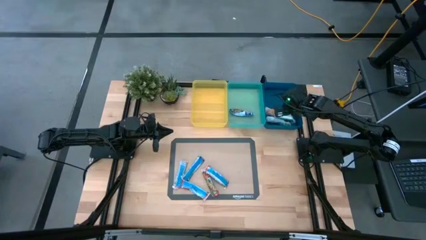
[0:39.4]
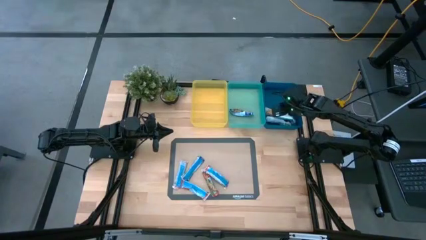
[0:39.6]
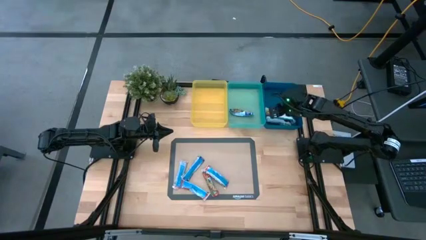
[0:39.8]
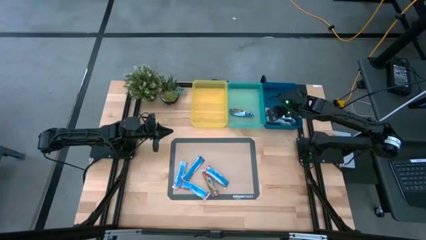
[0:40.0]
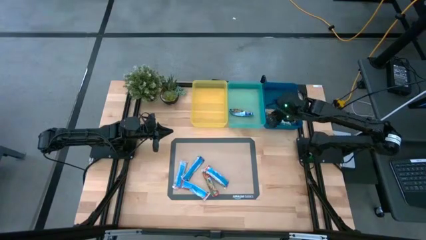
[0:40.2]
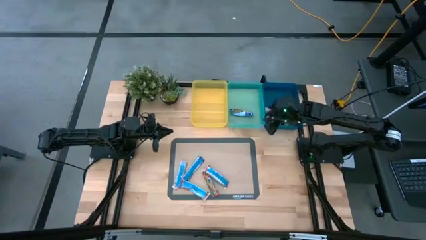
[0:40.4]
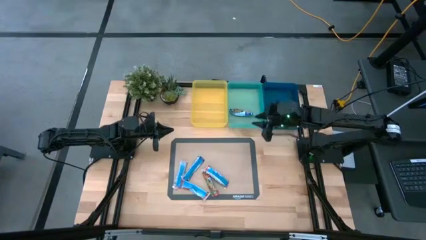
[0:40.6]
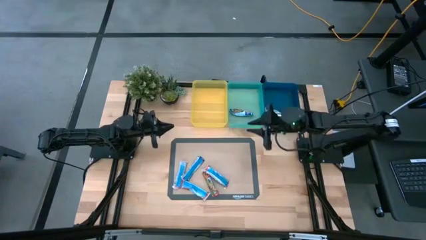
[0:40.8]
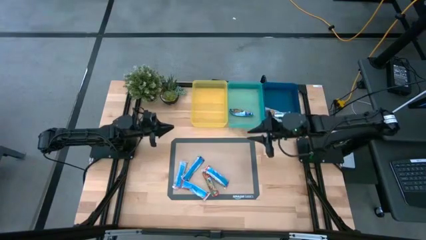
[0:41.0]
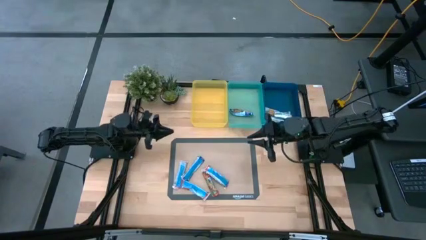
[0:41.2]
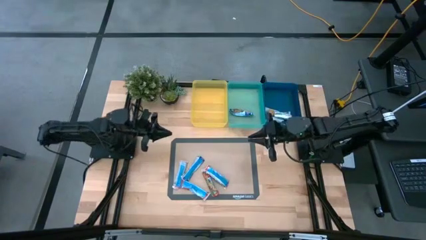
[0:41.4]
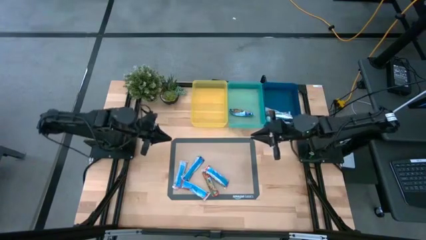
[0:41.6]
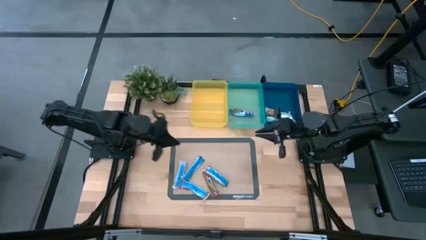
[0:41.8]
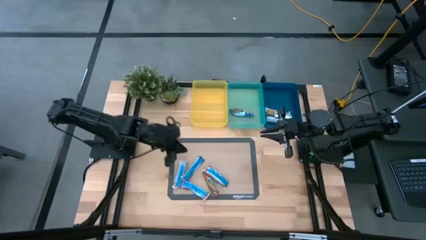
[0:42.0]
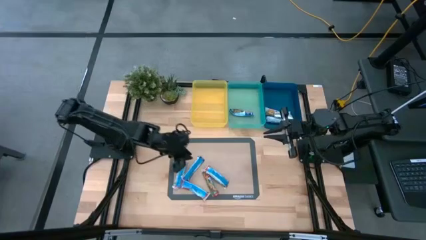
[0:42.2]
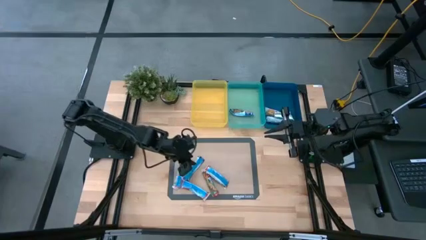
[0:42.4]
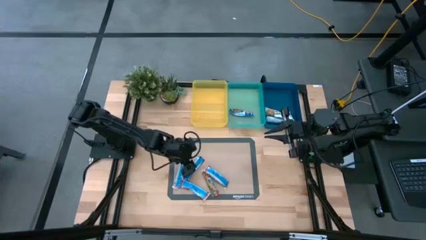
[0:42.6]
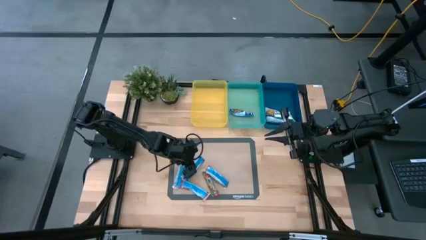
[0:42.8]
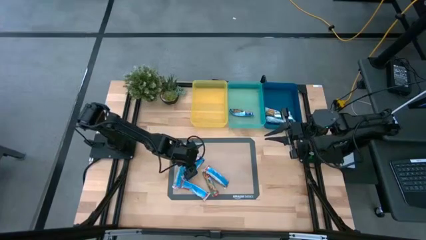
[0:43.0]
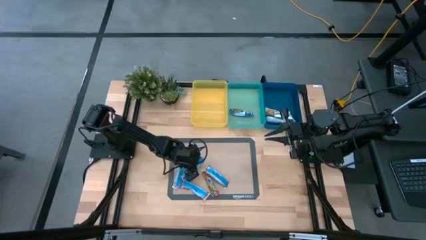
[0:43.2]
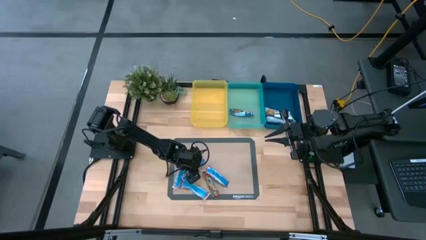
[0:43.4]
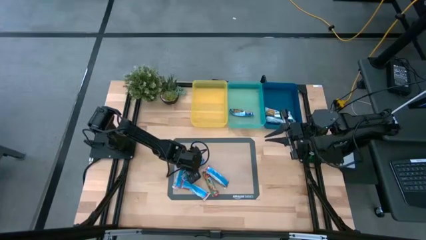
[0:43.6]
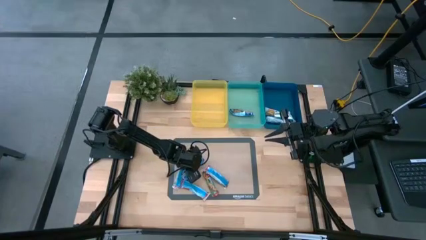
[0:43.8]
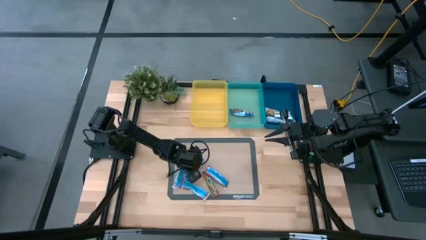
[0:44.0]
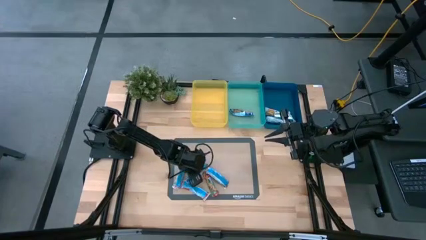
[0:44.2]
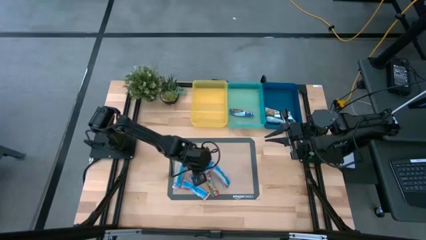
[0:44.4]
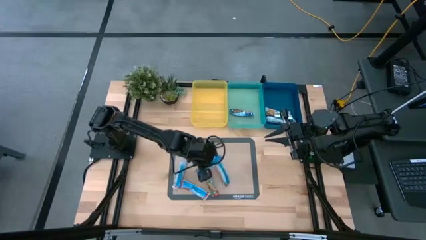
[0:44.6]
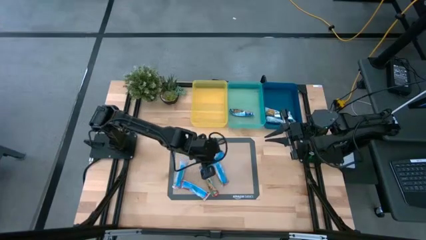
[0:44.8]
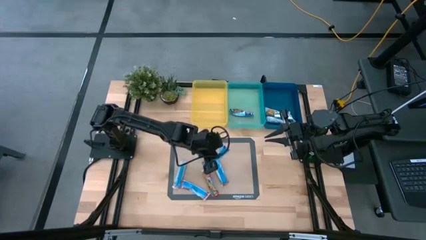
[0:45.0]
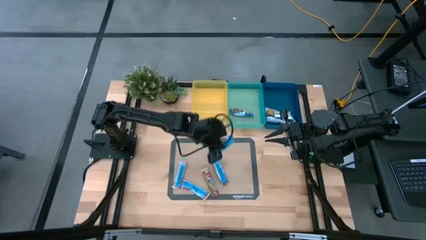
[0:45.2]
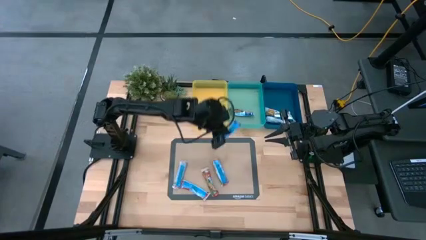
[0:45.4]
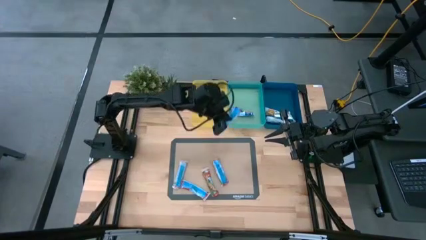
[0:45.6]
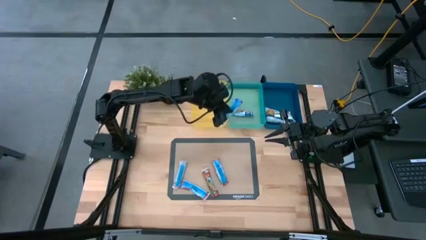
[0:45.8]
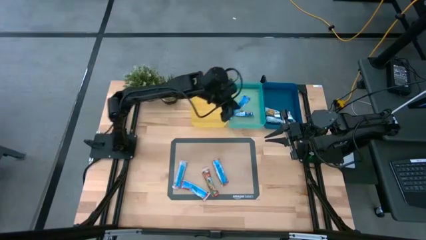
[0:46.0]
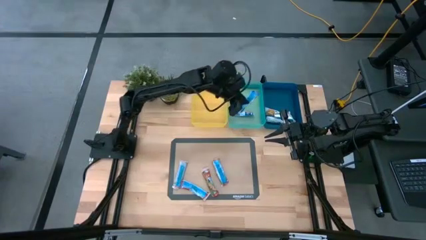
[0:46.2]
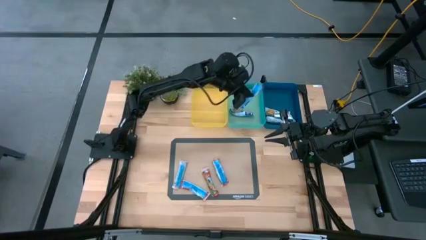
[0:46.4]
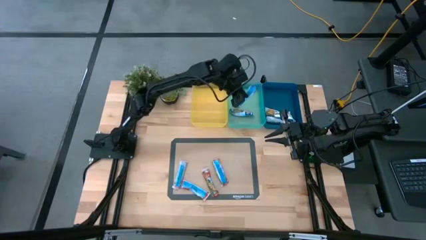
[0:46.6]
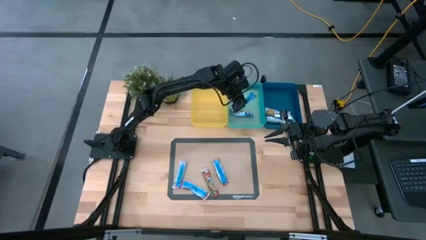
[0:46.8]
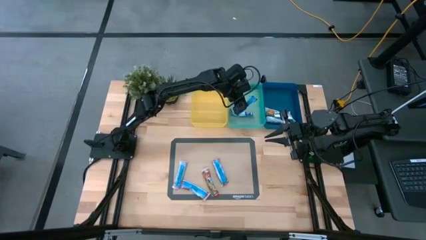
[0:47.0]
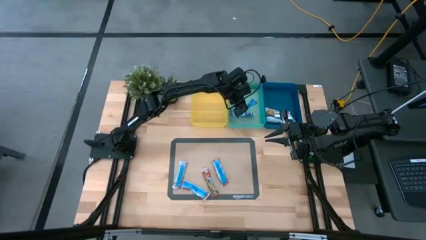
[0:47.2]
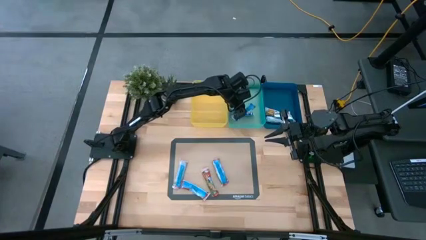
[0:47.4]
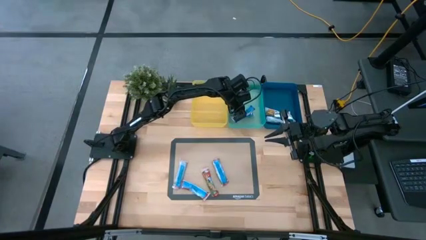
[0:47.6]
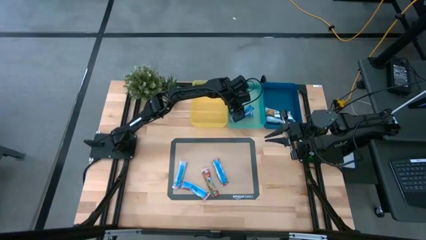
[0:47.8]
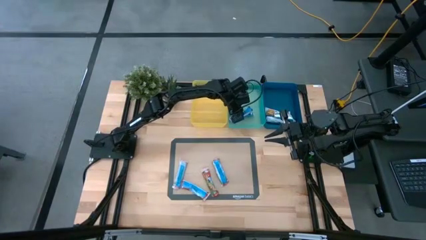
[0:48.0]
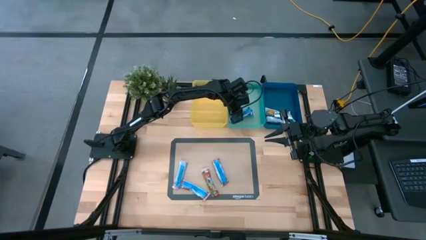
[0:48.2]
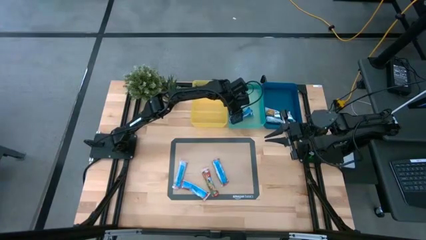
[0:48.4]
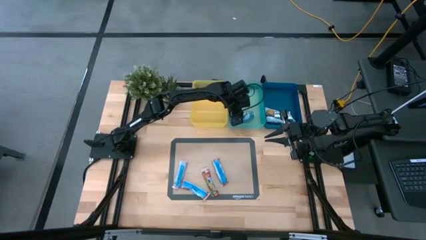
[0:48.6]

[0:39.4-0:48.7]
Task: Pick and place Granola Bars by type
Put the blue granola bar into the green bin

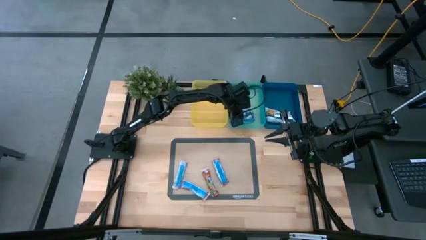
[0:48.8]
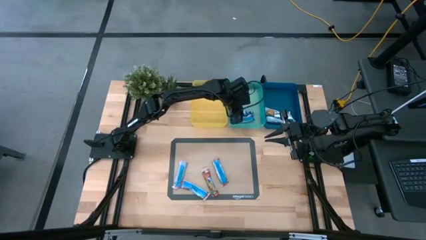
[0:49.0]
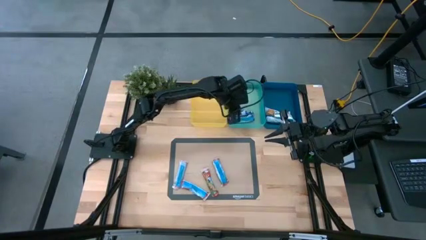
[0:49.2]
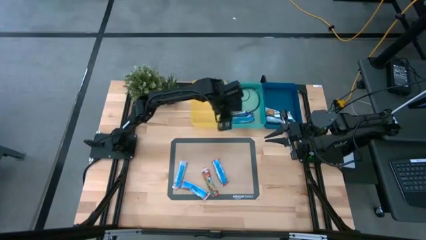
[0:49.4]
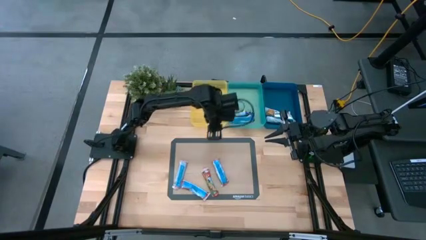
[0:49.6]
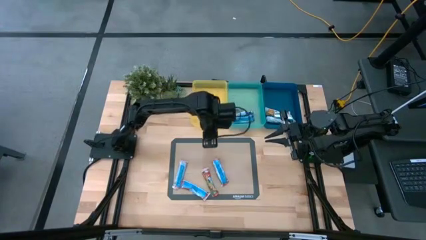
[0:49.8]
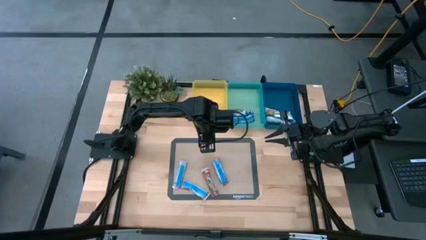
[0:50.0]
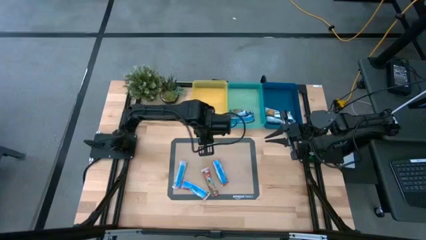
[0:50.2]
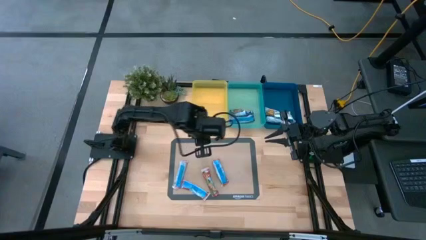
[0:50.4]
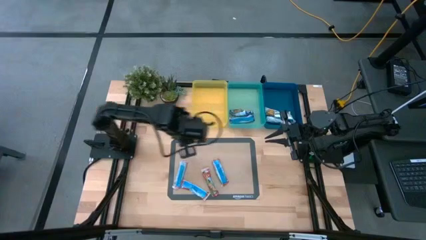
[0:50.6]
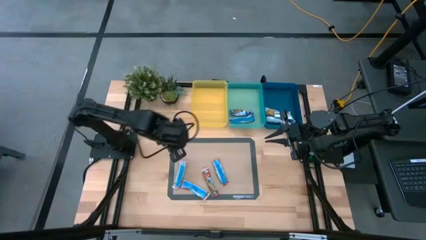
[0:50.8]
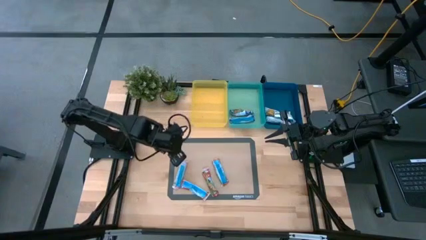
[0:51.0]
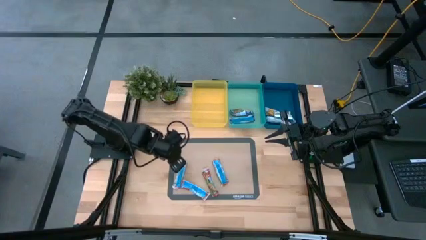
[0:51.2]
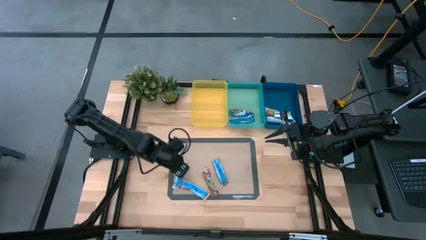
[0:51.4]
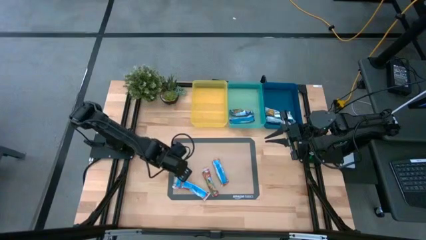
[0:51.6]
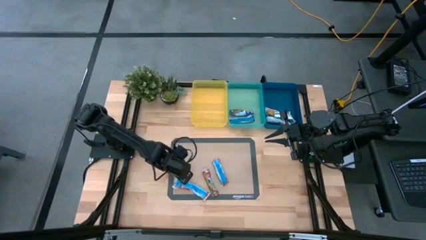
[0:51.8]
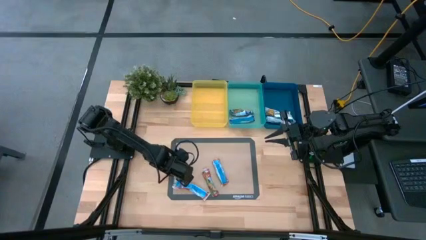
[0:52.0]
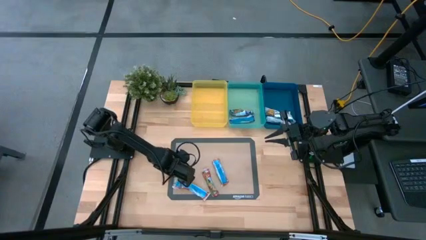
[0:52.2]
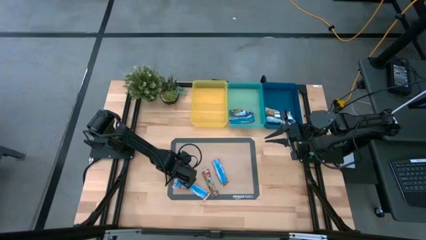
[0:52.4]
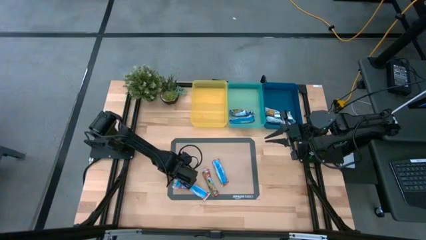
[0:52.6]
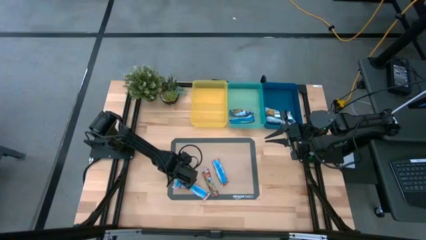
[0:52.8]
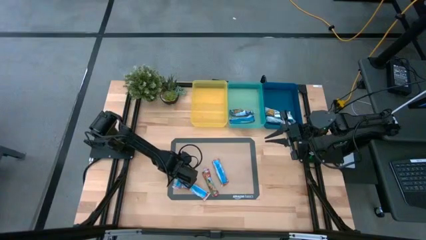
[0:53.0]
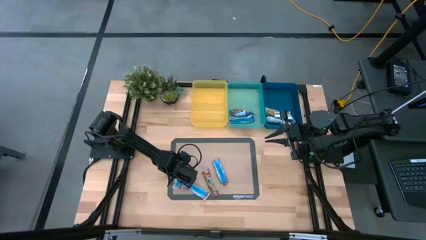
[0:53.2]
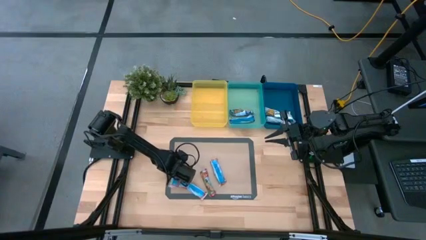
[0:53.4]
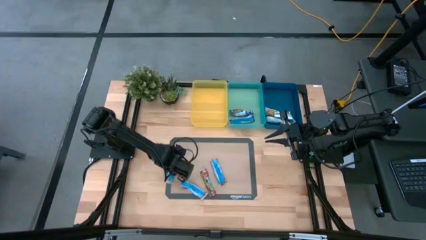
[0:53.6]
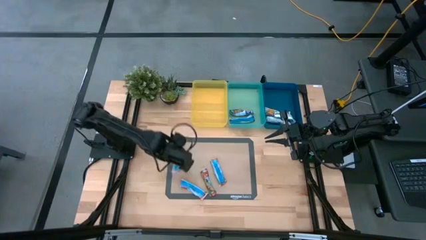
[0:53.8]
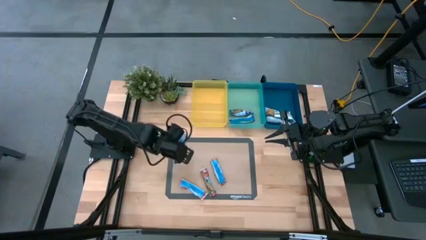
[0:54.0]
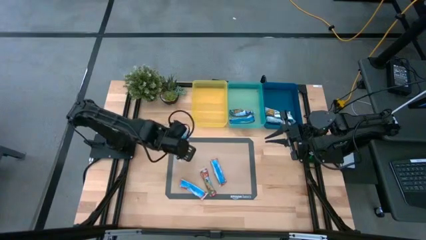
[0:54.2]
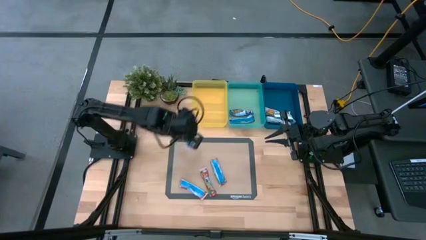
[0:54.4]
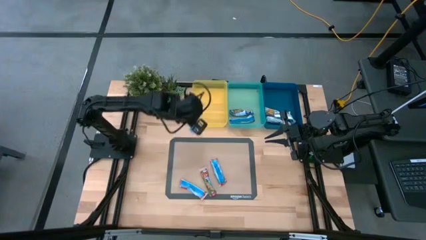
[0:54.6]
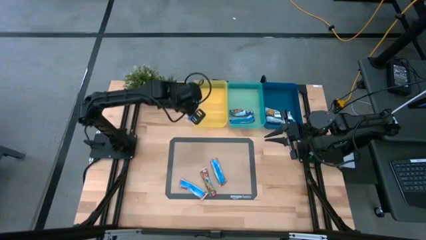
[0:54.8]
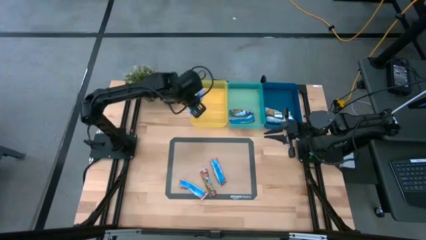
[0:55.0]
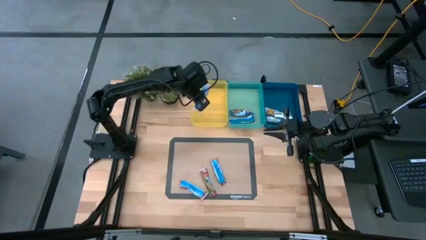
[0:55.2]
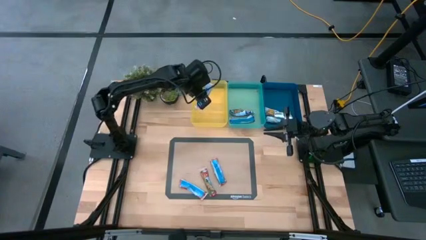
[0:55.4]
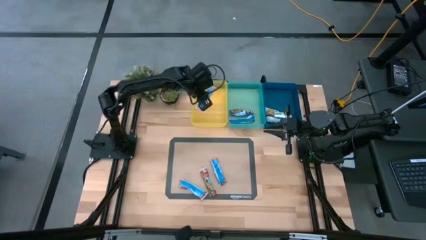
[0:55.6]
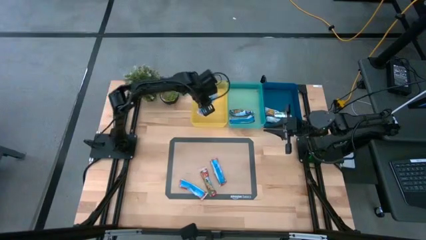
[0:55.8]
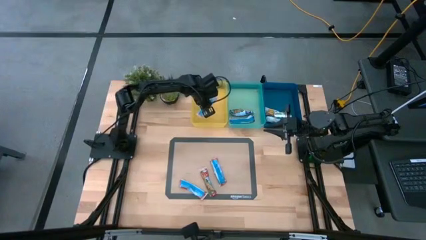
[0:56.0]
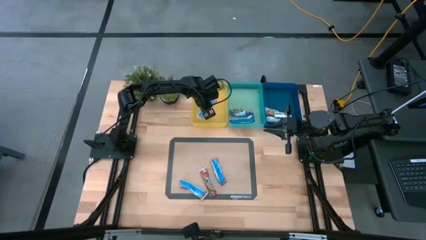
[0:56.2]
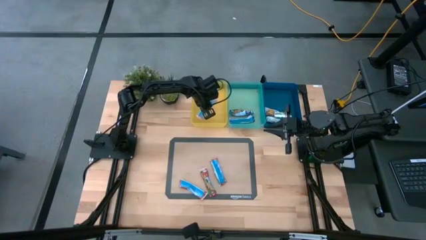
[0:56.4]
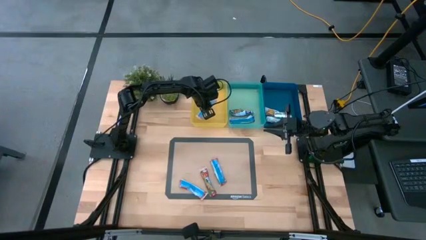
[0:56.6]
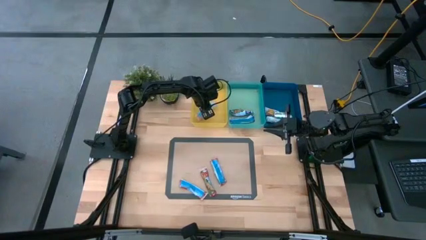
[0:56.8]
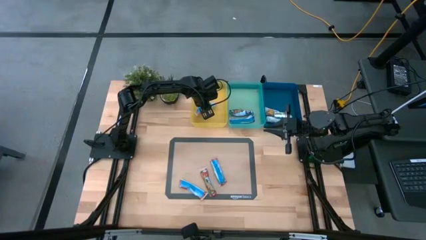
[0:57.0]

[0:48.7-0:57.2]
Put the red granola bar into the yellow bin
